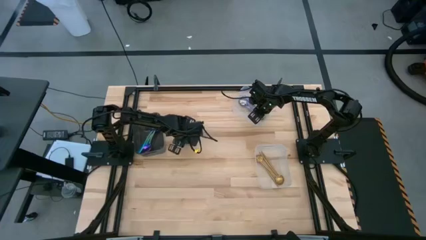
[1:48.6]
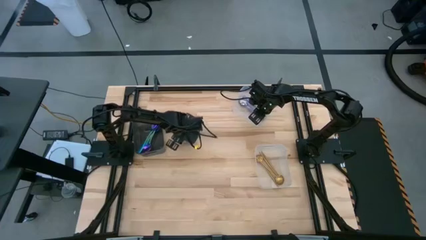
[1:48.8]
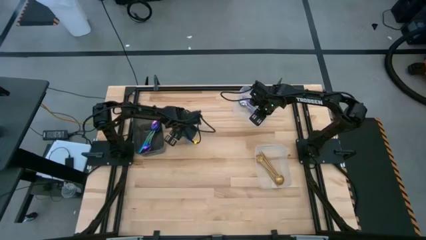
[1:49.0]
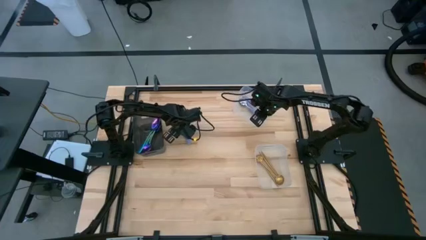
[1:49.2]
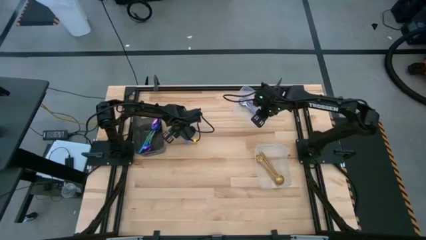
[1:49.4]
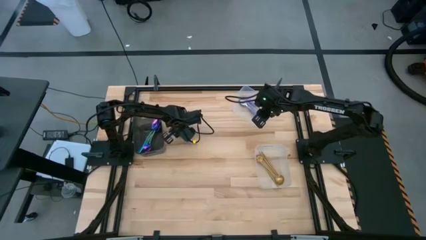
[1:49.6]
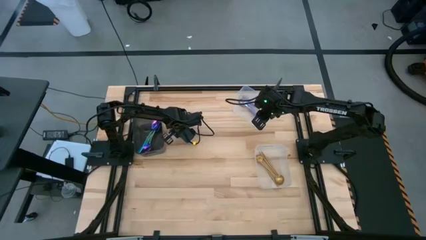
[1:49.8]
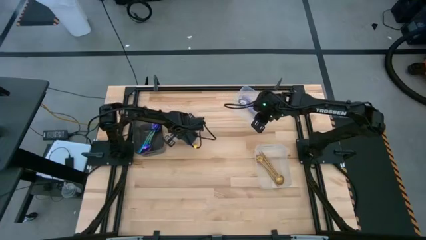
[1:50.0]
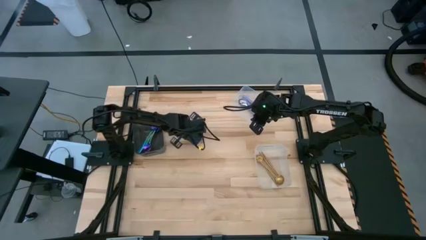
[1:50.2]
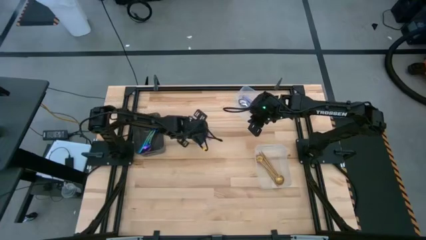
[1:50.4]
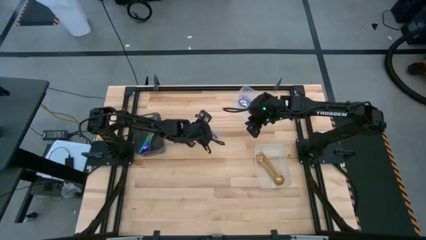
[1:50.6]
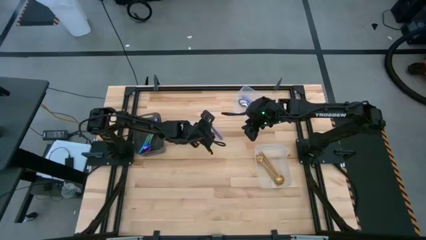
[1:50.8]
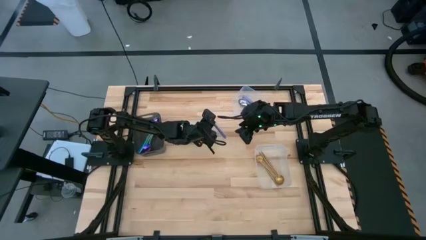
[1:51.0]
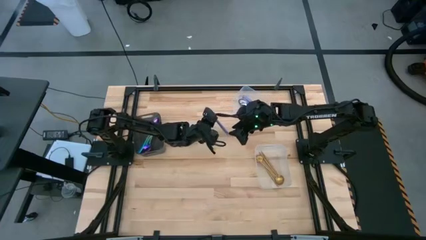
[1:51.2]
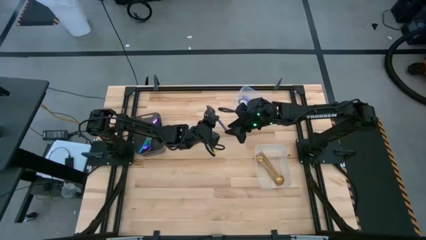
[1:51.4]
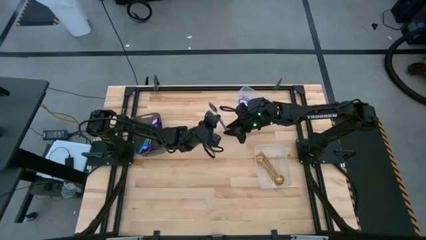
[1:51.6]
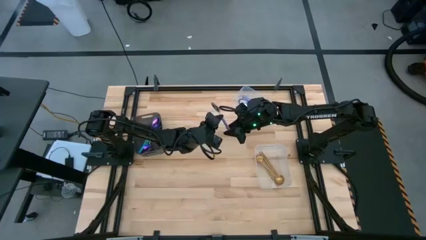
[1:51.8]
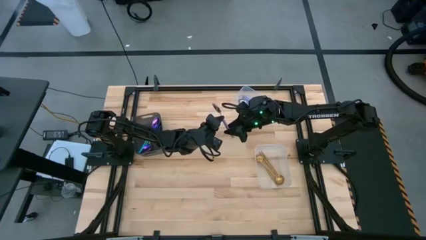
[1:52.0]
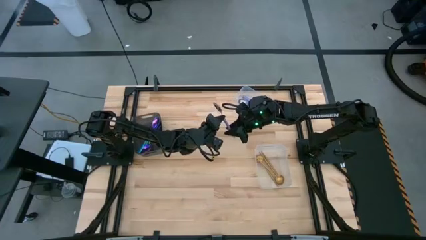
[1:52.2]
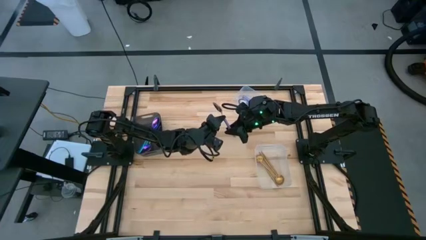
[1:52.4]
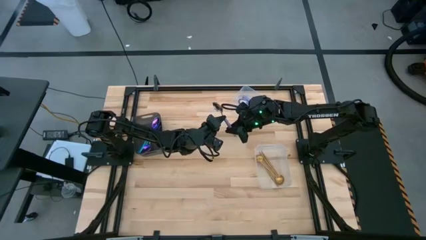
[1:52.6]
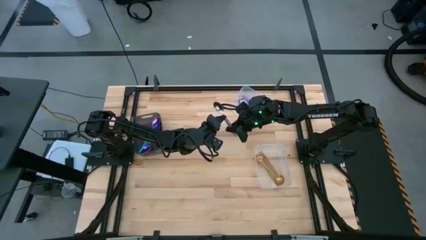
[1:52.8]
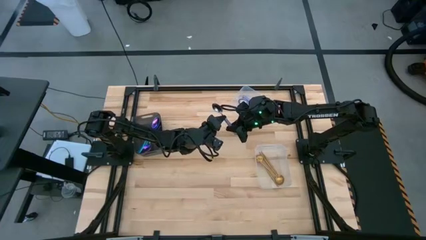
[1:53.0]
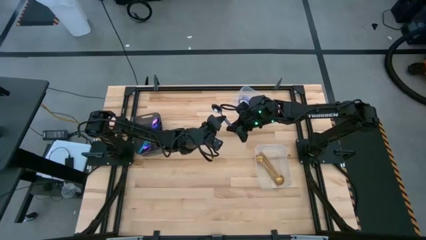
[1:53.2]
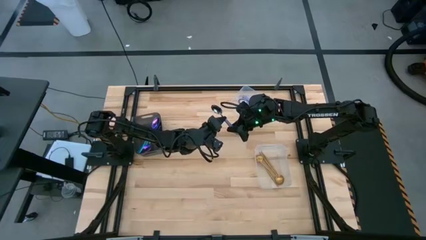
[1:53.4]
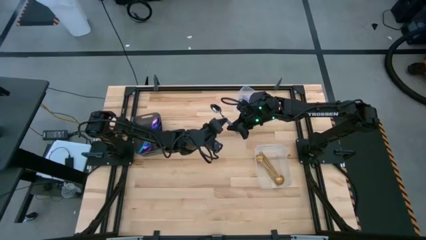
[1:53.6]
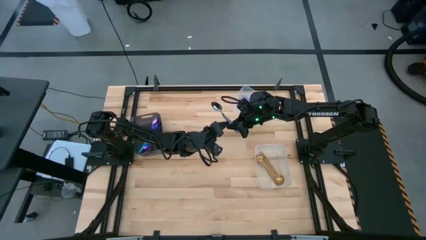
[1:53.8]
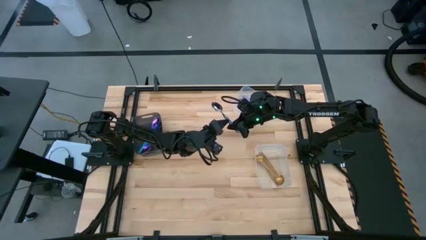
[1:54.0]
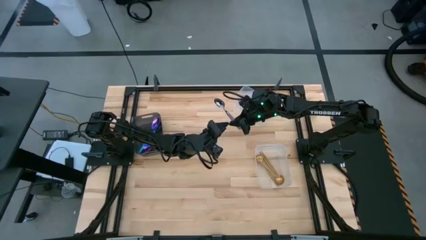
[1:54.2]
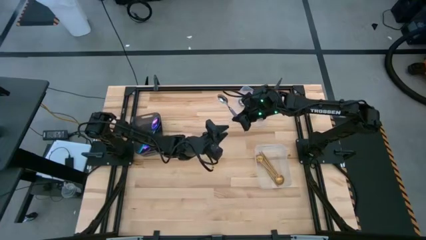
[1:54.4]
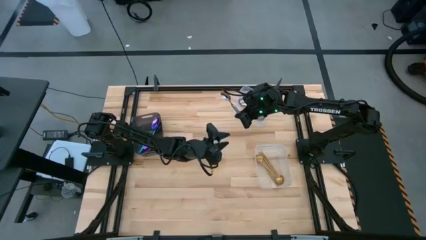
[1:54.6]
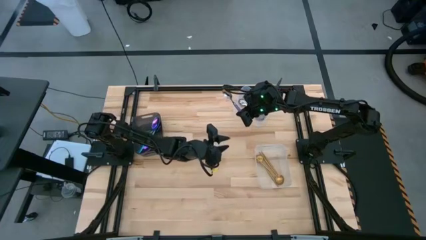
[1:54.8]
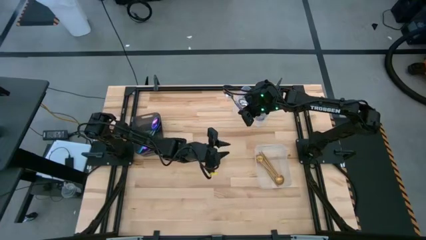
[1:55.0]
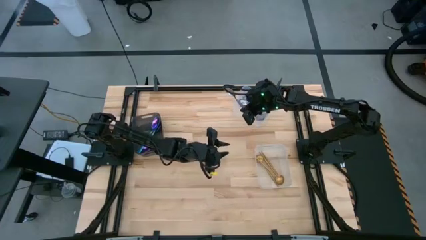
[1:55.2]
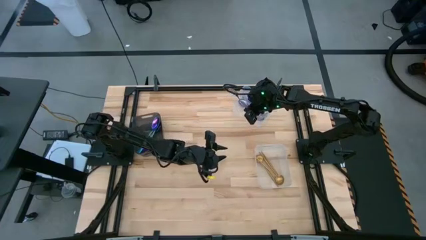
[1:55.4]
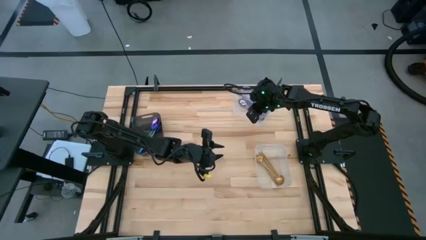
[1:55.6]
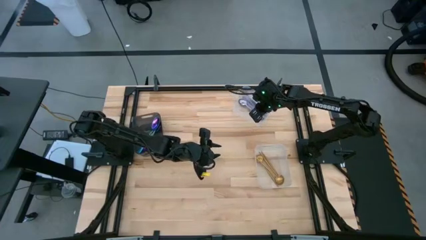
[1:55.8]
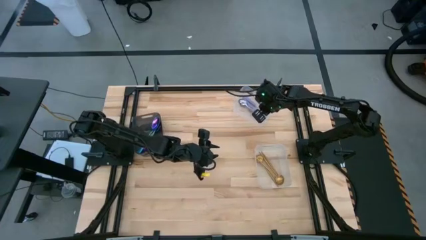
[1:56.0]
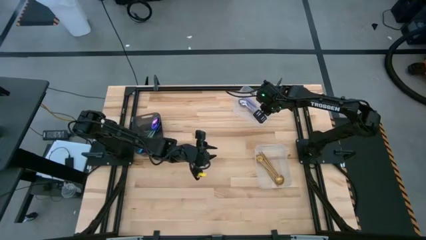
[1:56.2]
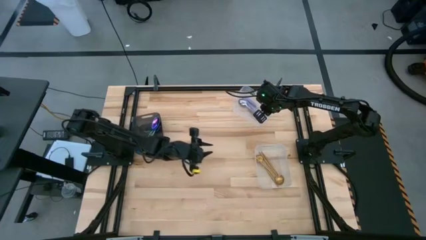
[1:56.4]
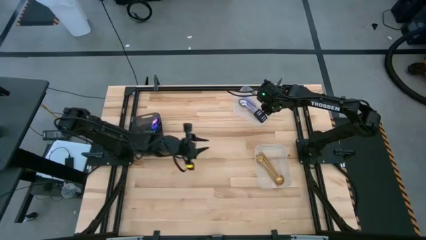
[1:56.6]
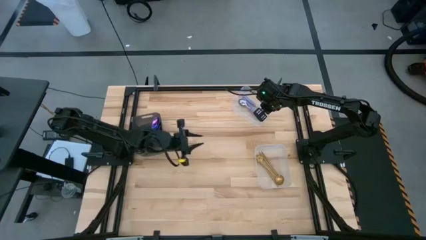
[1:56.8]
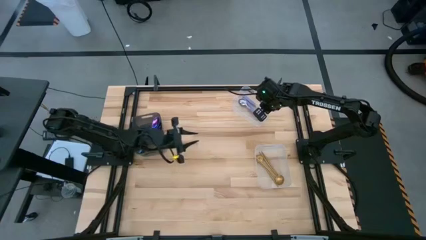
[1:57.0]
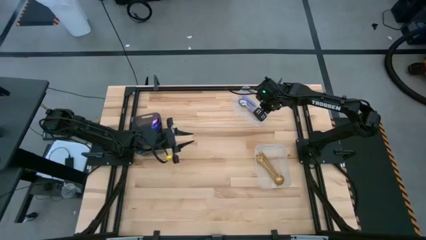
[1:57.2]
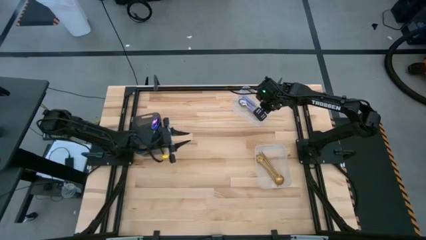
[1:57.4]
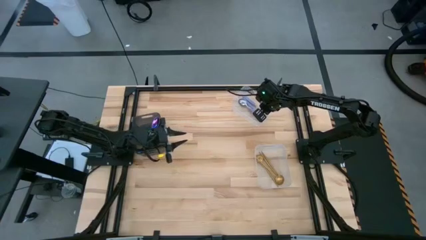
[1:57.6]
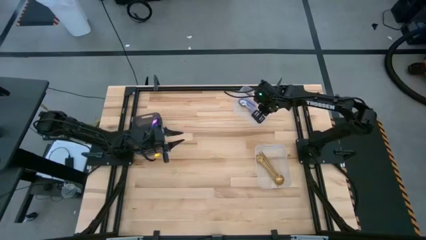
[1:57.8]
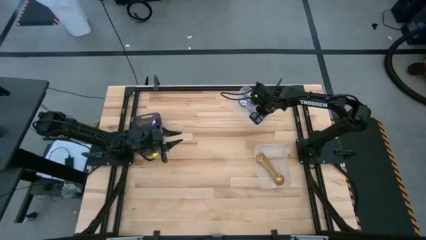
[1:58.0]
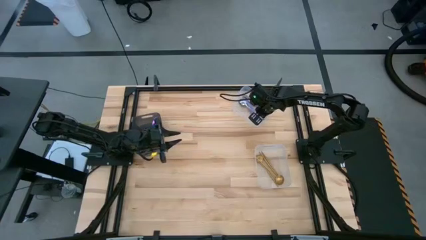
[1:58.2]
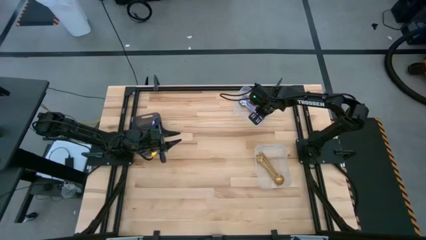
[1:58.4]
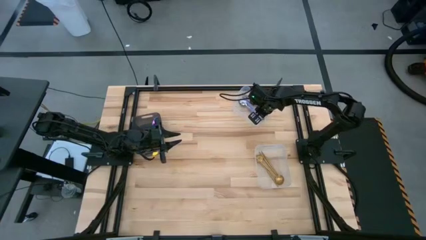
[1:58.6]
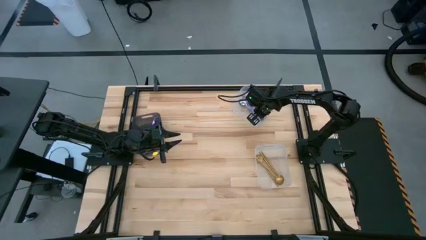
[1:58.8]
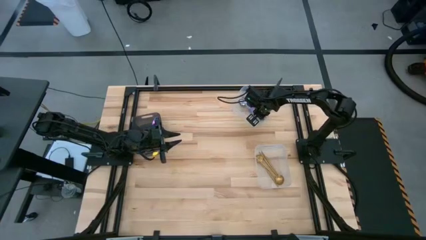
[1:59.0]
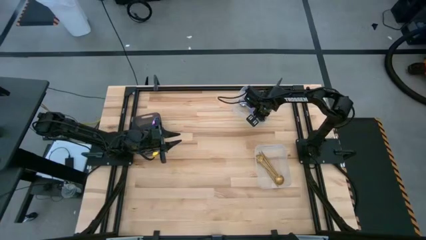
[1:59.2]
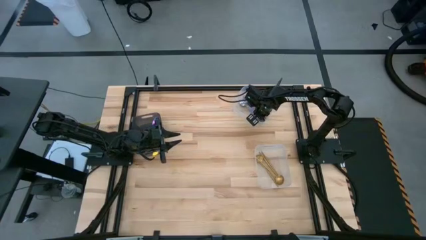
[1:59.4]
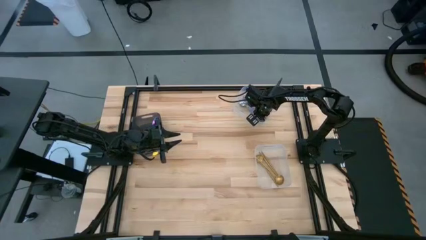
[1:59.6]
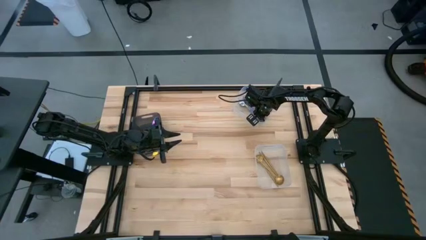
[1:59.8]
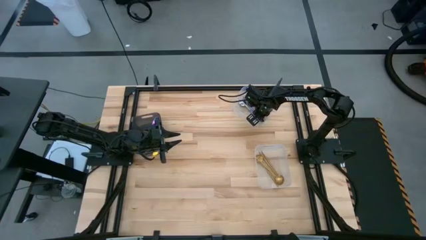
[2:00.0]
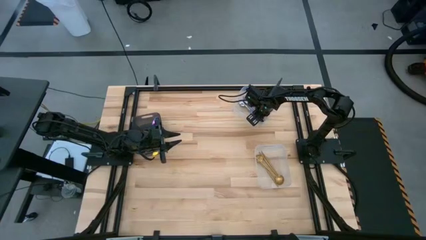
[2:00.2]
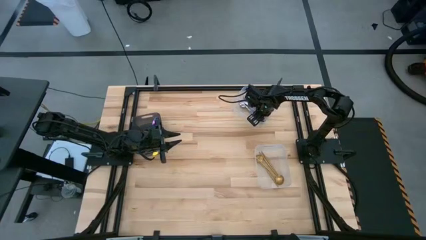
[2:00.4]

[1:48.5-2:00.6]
Task: Sort silverware by color (type)
Put the purple spoon into the top transparent bin
